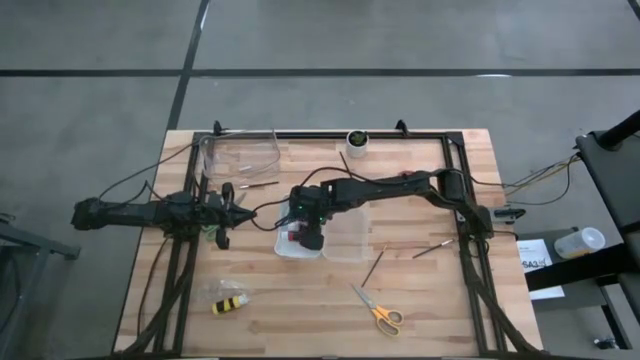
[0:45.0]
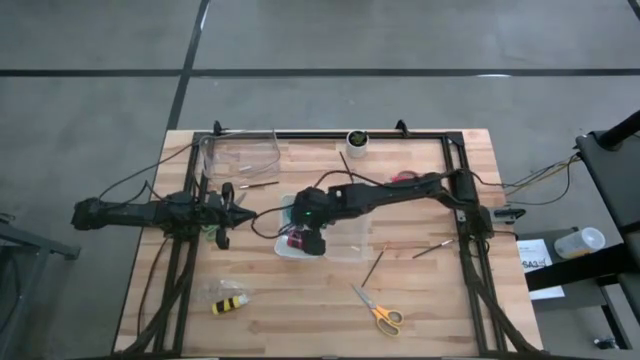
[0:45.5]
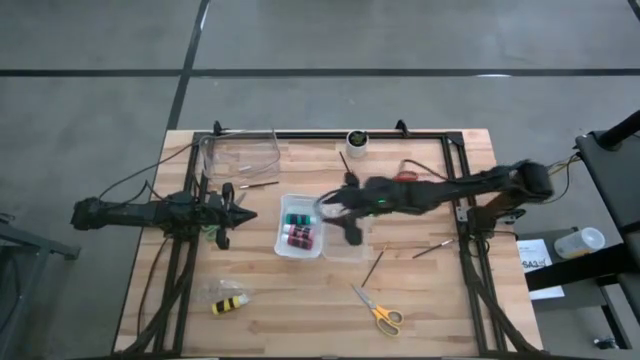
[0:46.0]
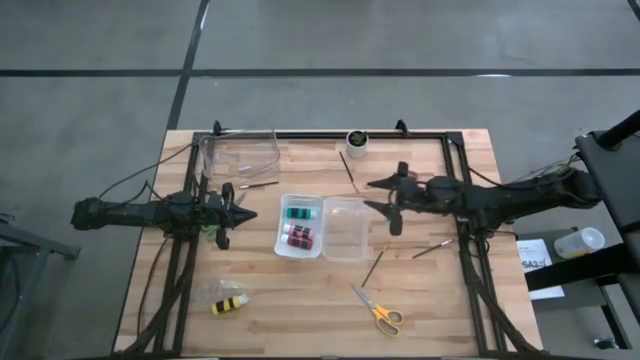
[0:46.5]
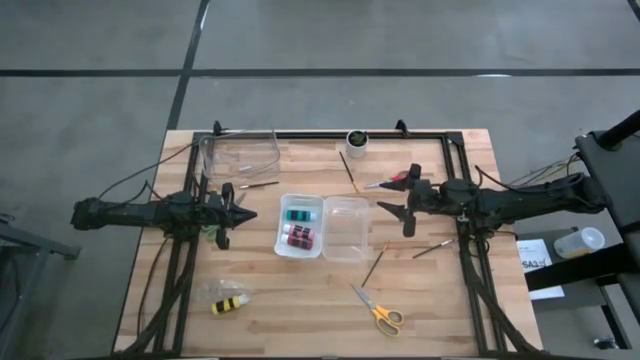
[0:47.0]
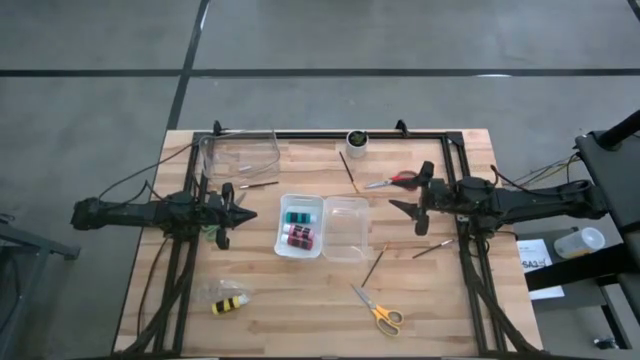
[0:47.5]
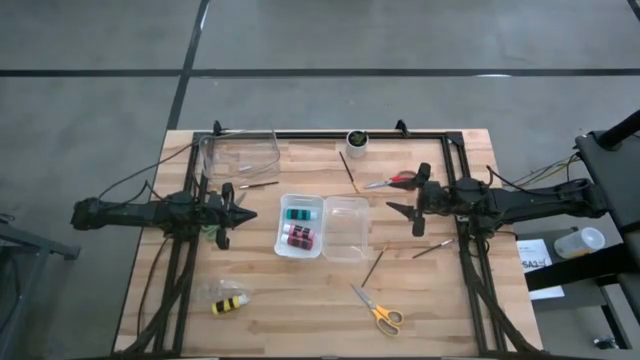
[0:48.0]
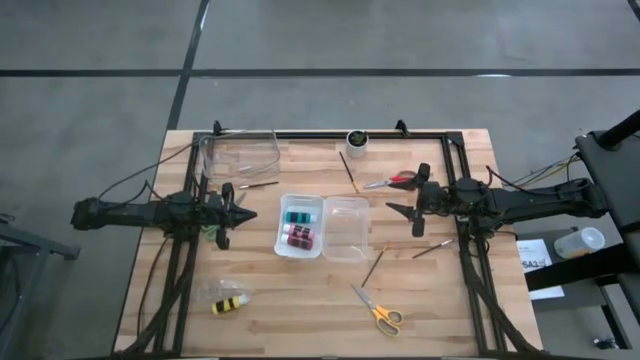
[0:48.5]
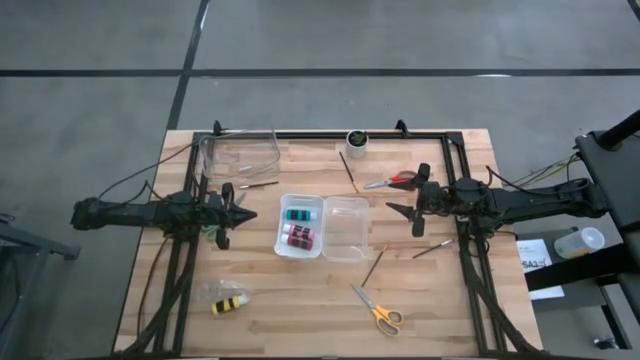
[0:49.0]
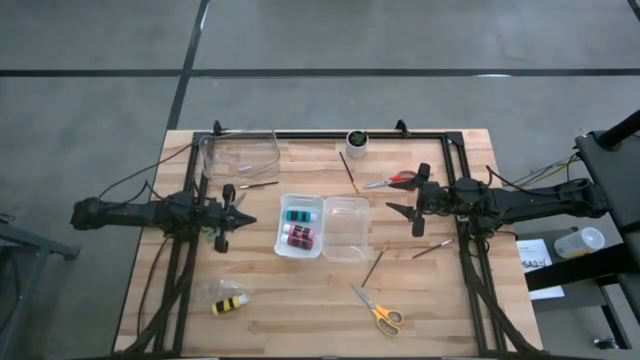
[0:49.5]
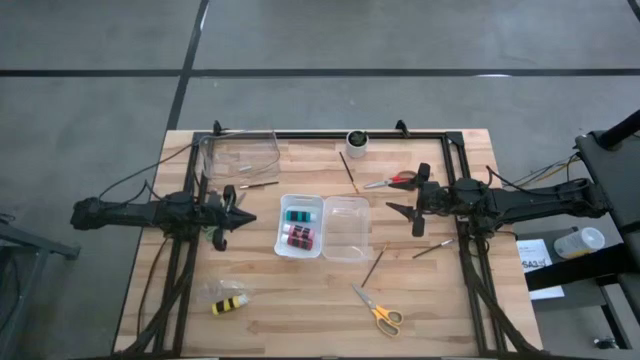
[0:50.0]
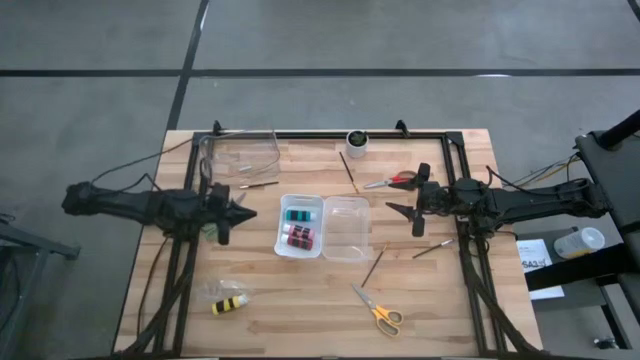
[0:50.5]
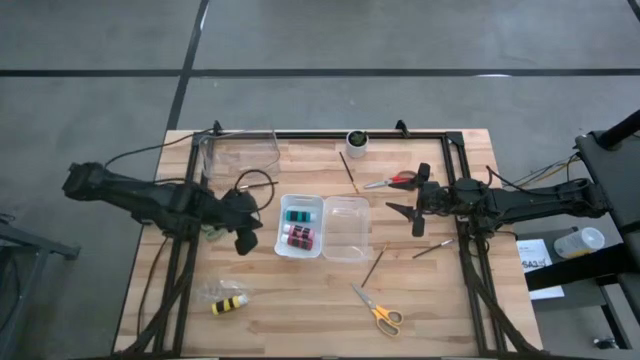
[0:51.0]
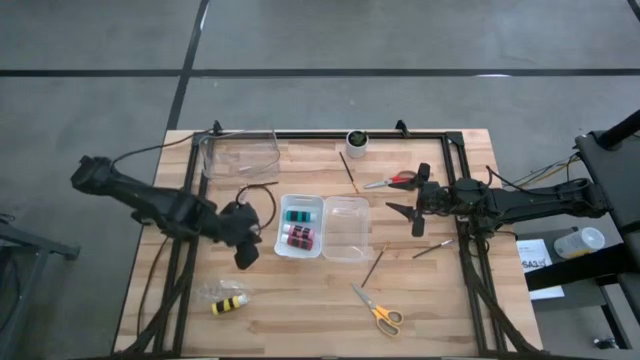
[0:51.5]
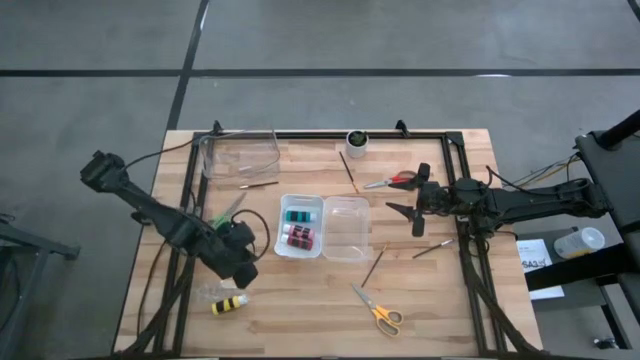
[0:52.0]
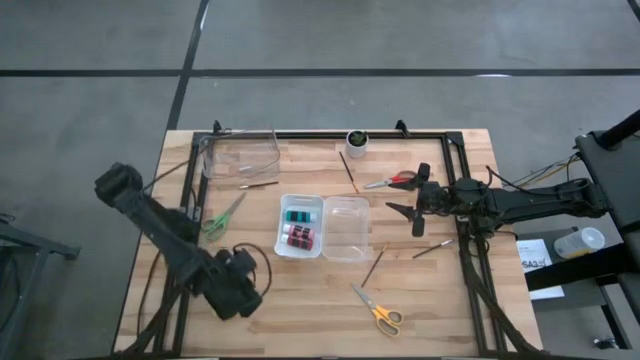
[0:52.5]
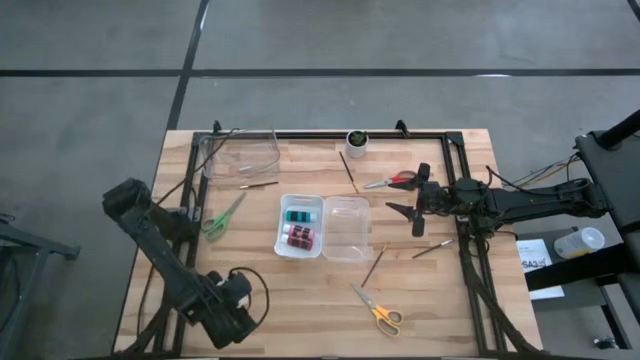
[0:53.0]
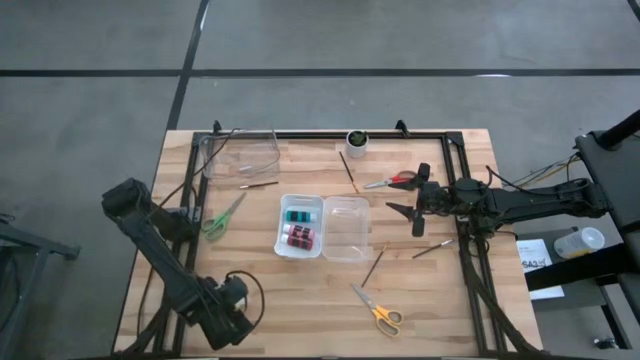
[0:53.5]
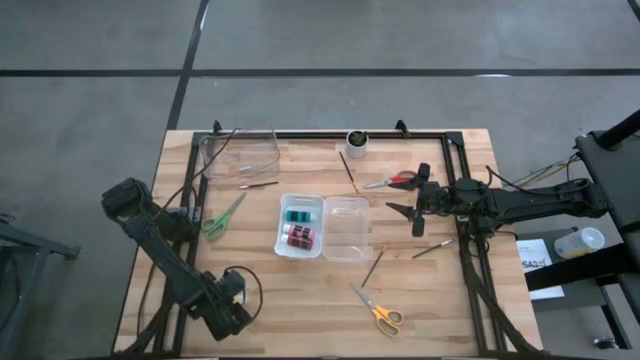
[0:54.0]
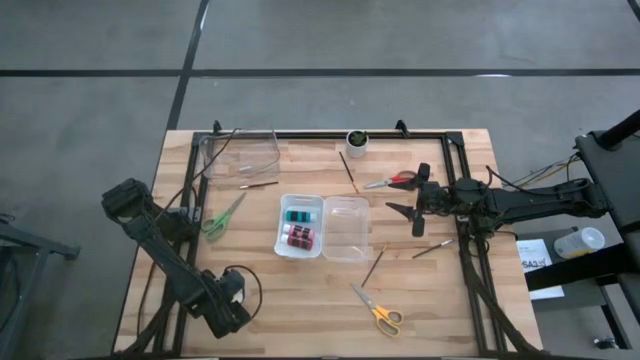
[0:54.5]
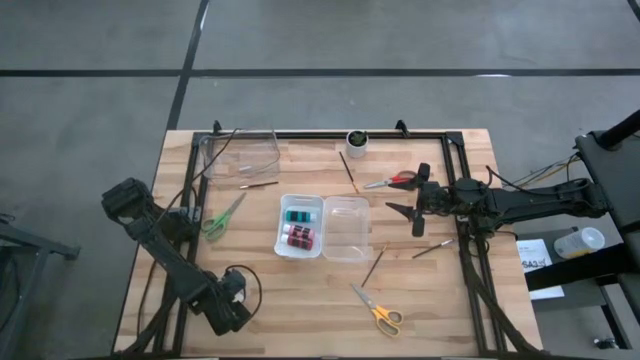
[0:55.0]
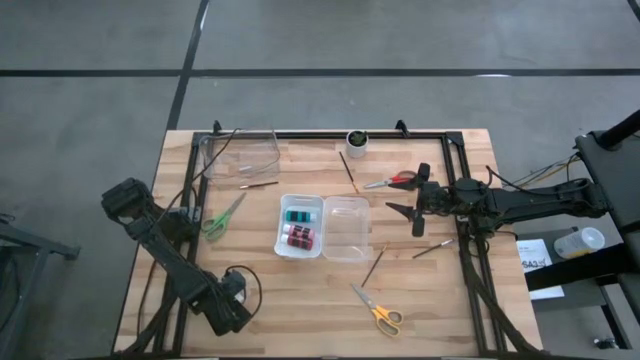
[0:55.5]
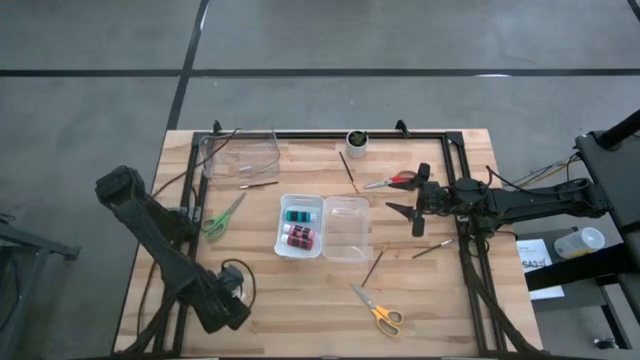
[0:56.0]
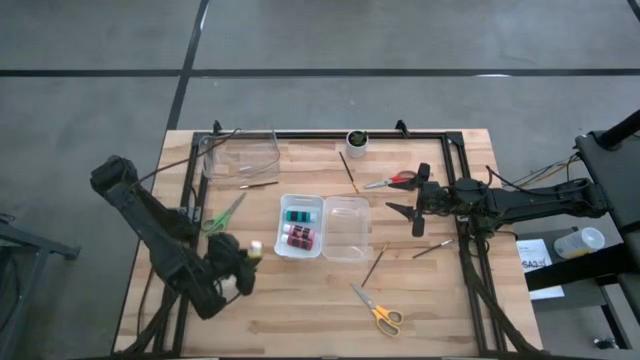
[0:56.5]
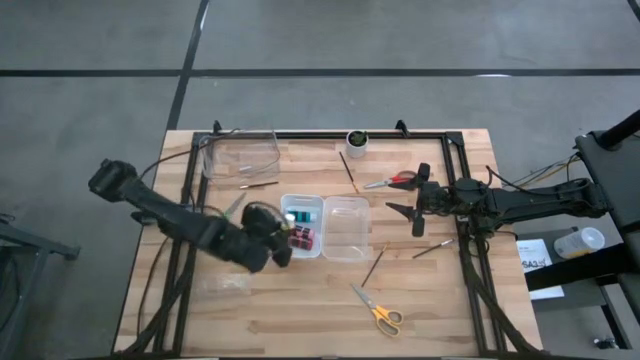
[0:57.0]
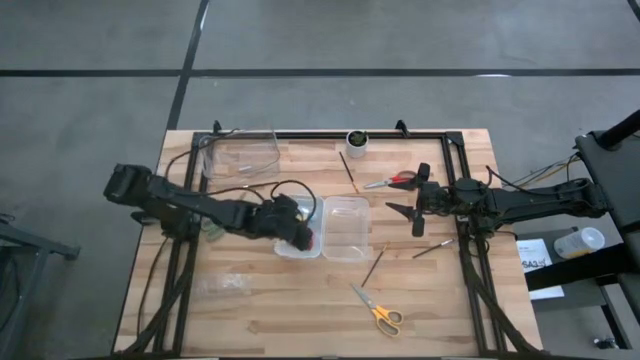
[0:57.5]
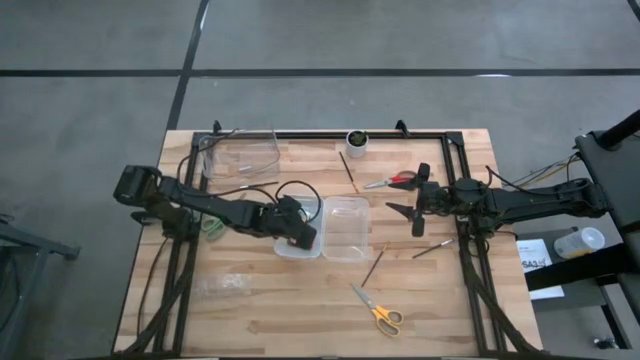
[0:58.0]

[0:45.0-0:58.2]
Task: Pick & Place Paint Supplies
Put the yellow paint bottle into the white bin

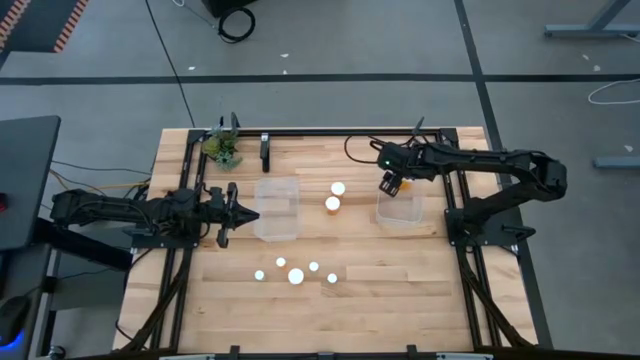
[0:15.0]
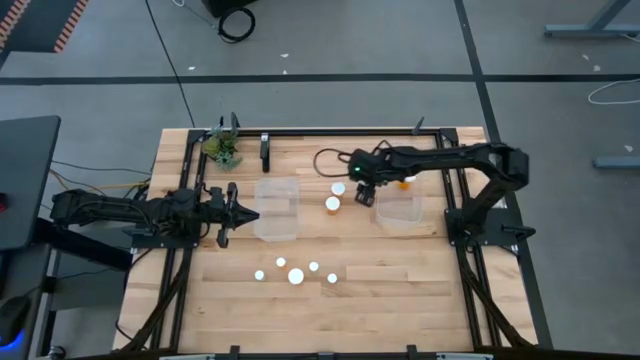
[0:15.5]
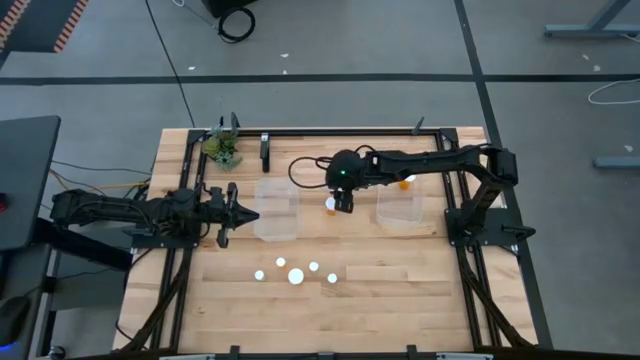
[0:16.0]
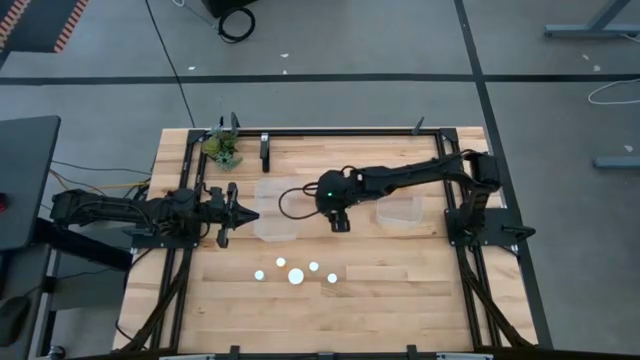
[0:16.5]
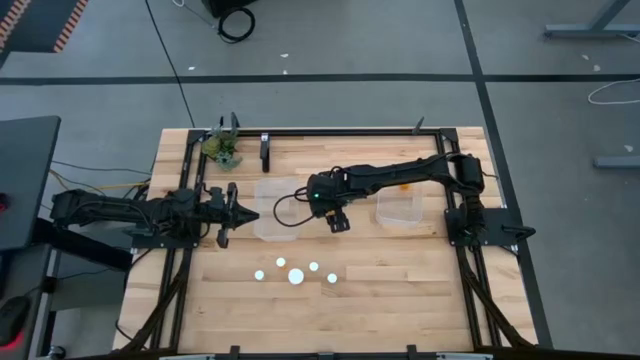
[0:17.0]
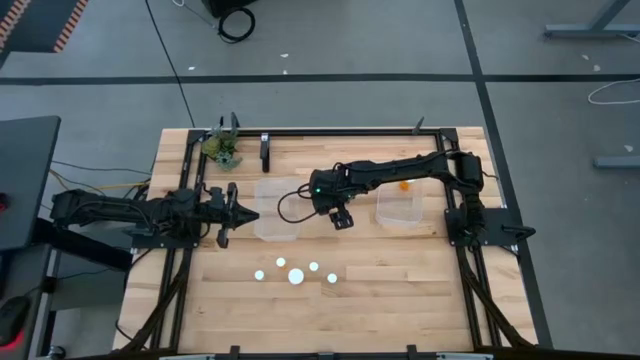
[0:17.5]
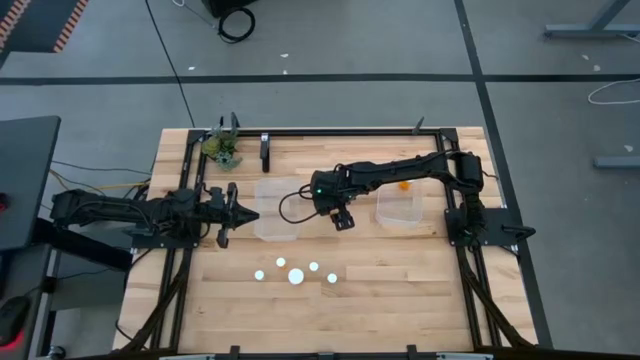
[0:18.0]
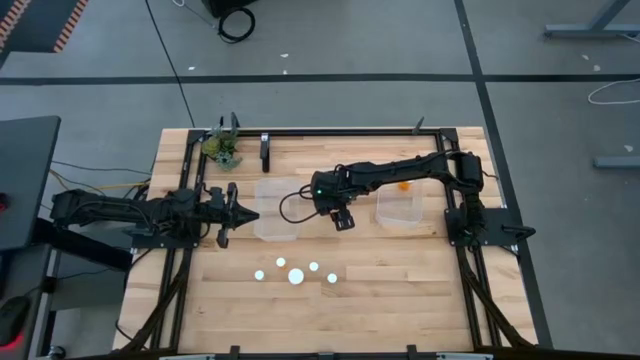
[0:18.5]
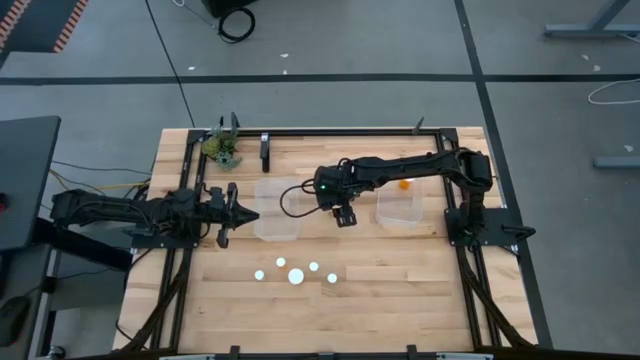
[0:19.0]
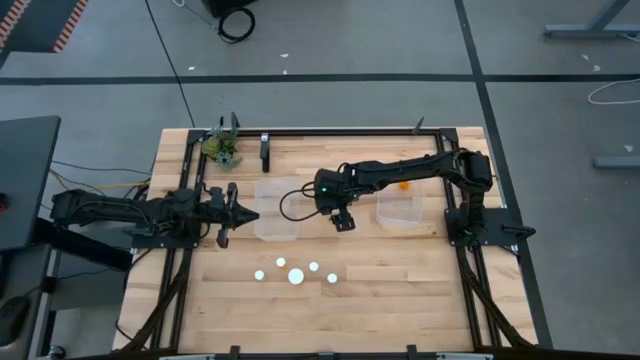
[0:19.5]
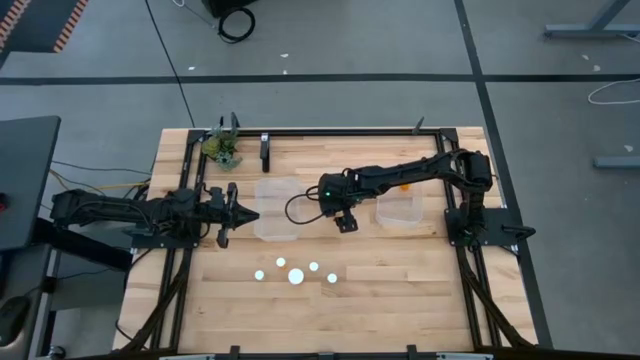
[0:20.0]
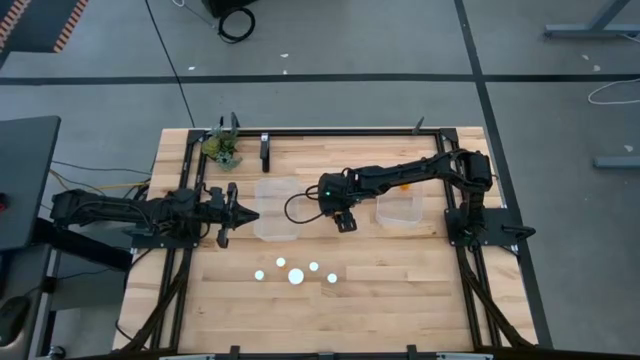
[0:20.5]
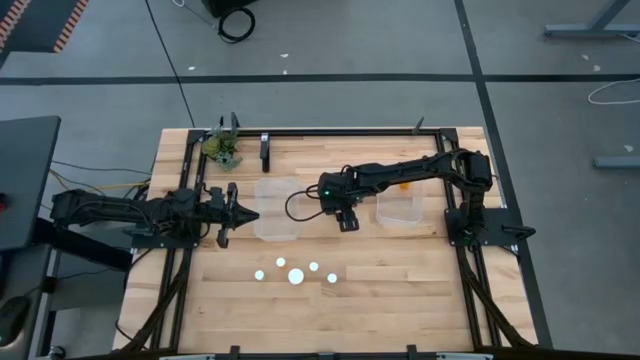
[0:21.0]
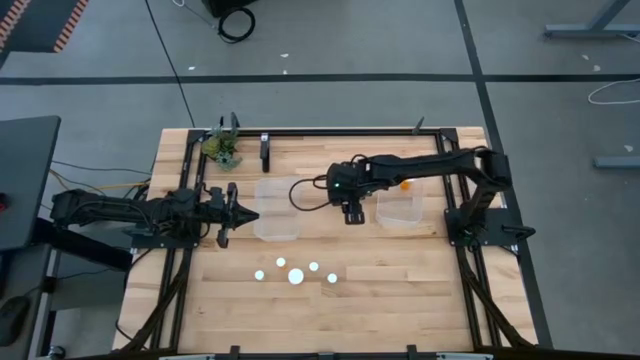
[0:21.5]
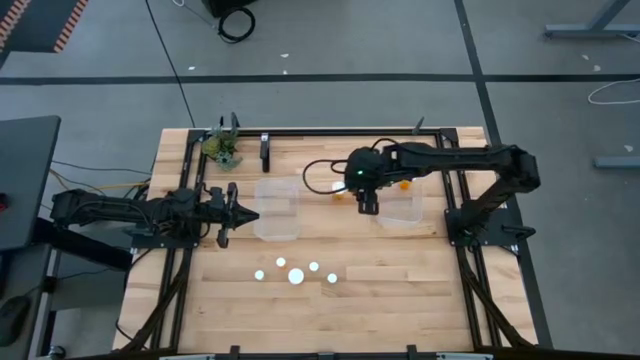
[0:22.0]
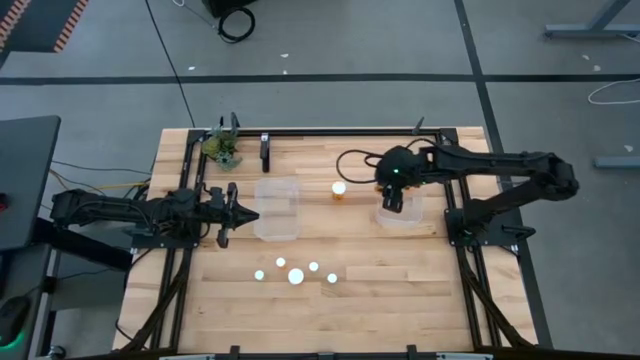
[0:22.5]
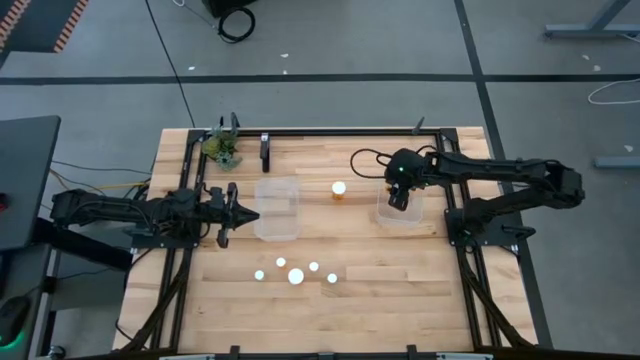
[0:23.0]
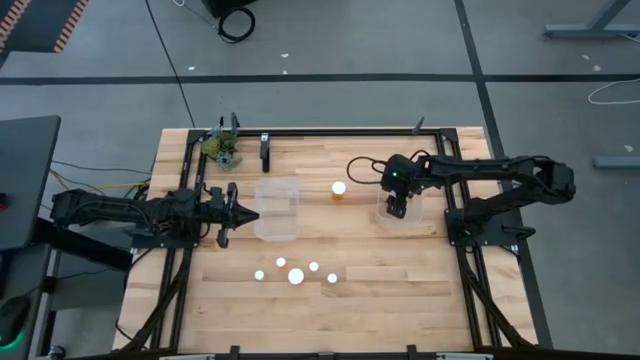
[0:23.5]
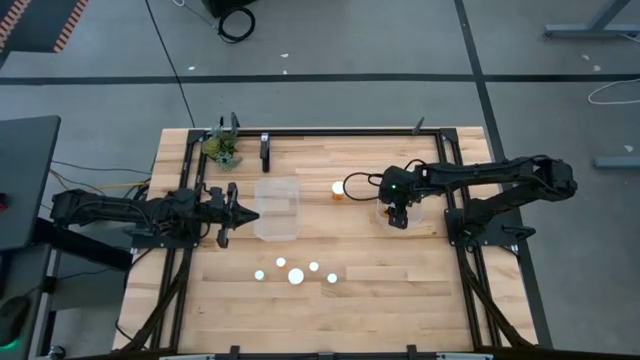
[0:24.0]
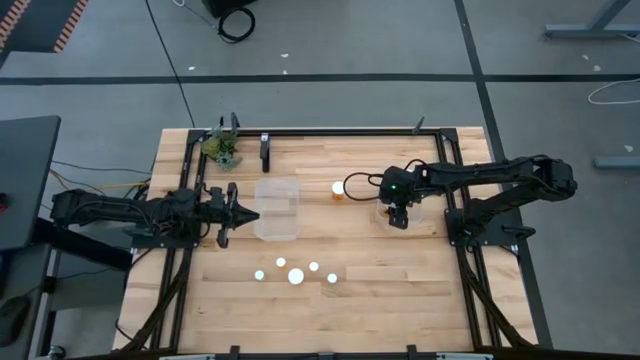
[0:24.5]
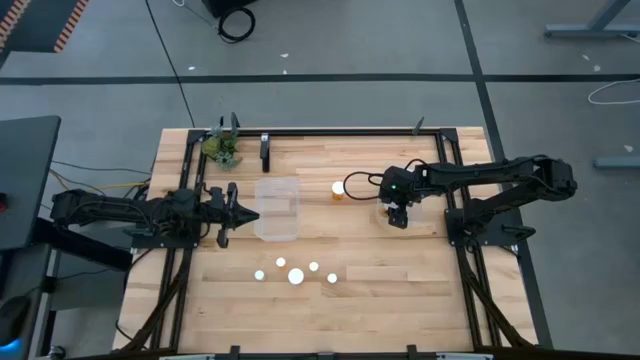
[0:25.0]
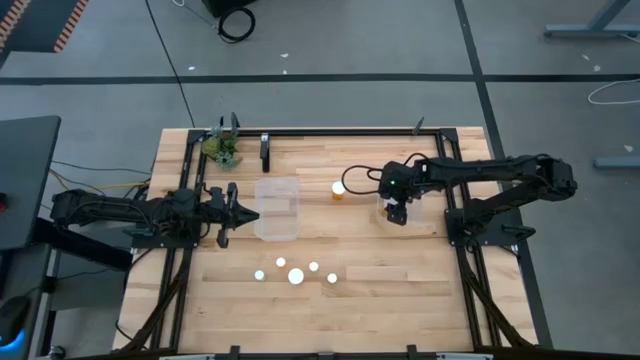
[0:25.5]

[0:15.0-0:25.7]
Task: Pick and place medicine bottles into bin by pill shape (circle, oval)
Put the large orange pill bottle into the right transparent bin
